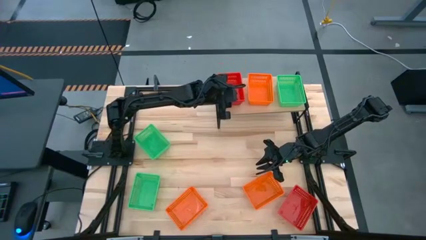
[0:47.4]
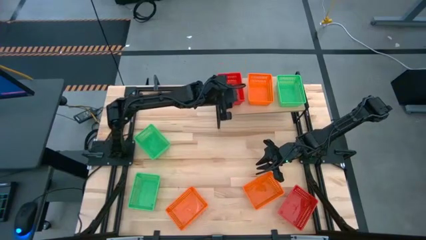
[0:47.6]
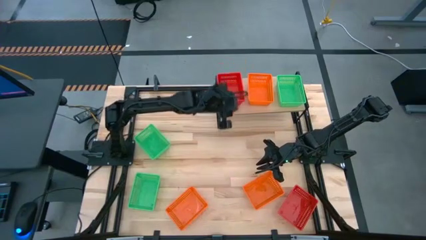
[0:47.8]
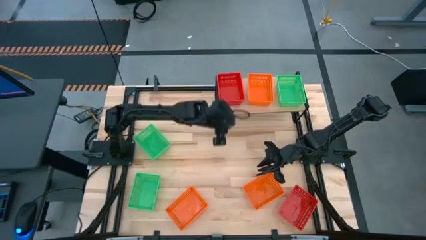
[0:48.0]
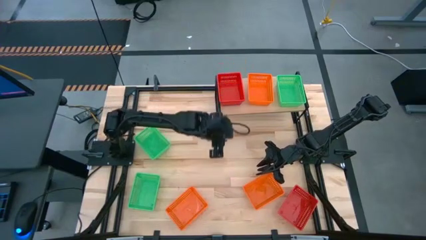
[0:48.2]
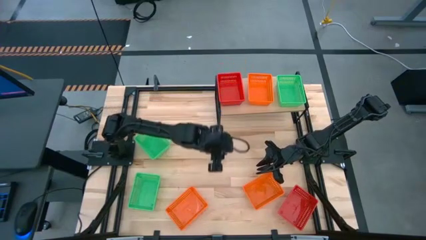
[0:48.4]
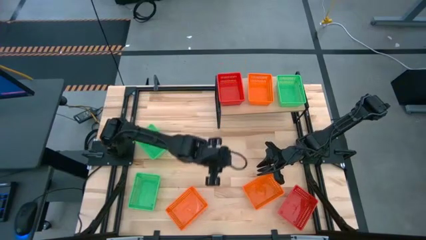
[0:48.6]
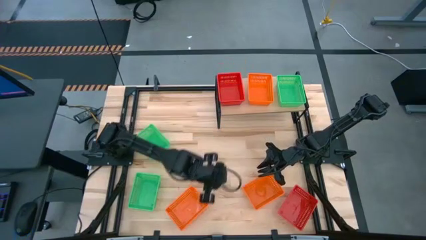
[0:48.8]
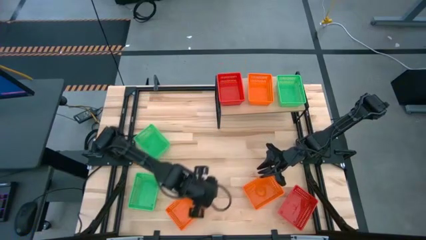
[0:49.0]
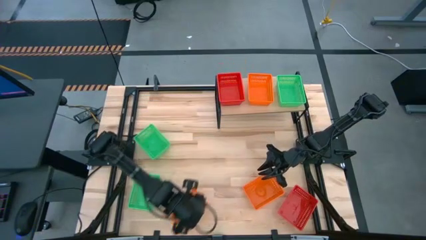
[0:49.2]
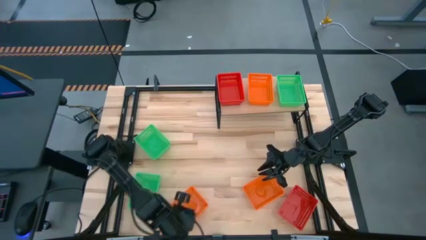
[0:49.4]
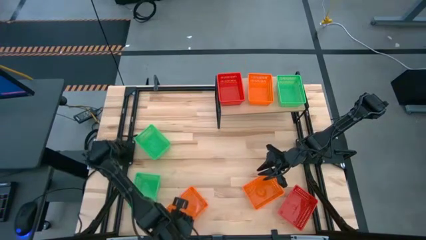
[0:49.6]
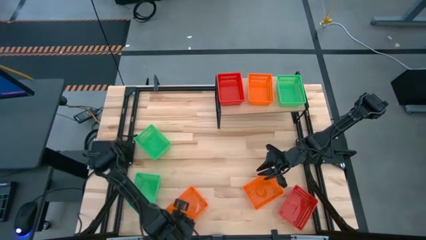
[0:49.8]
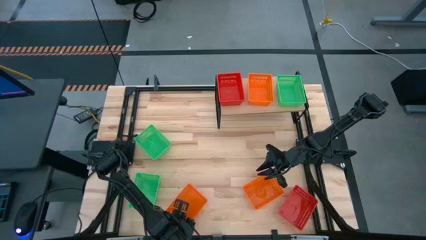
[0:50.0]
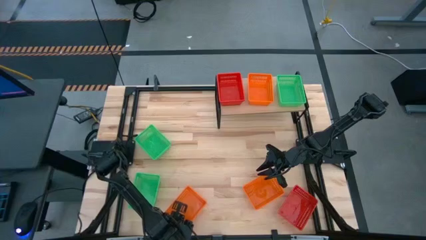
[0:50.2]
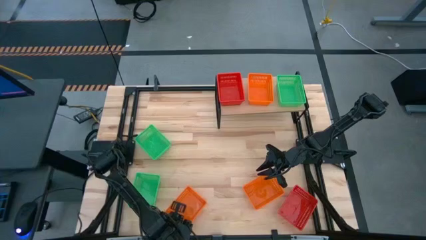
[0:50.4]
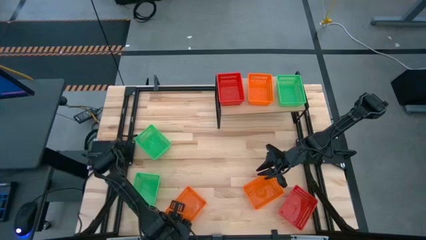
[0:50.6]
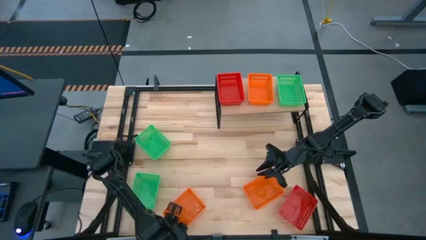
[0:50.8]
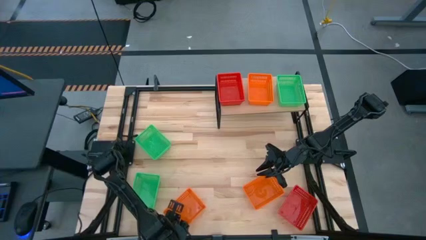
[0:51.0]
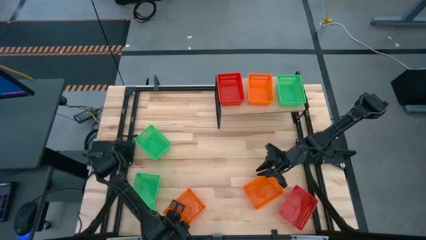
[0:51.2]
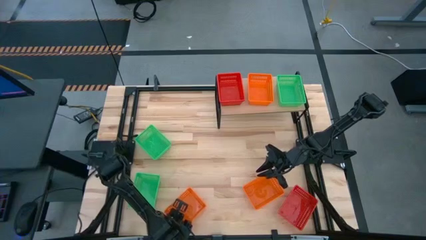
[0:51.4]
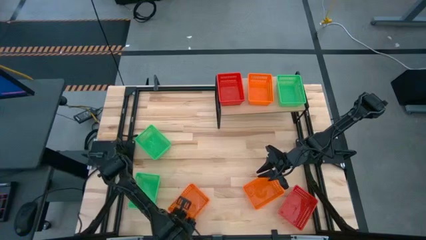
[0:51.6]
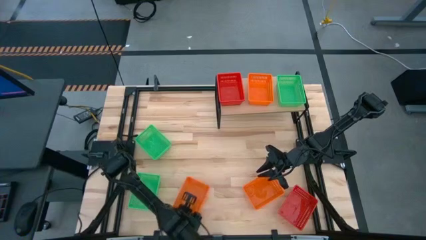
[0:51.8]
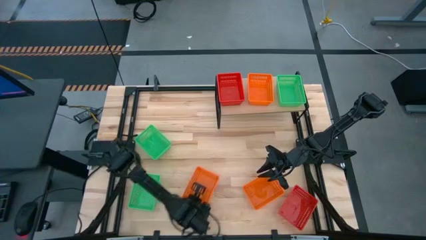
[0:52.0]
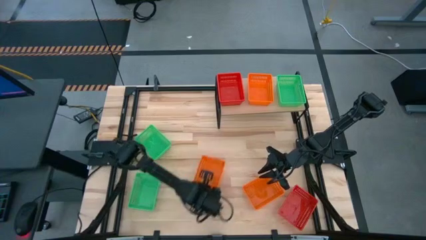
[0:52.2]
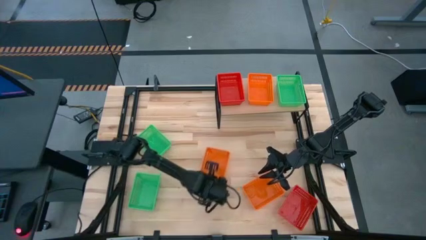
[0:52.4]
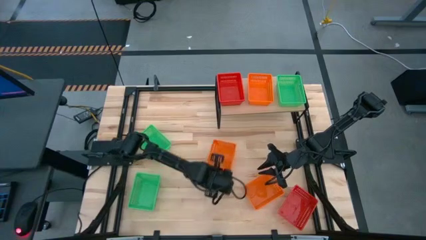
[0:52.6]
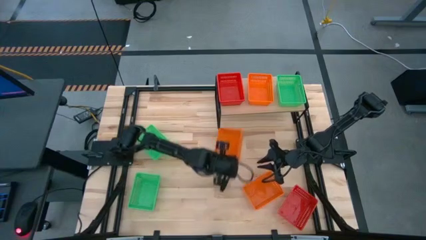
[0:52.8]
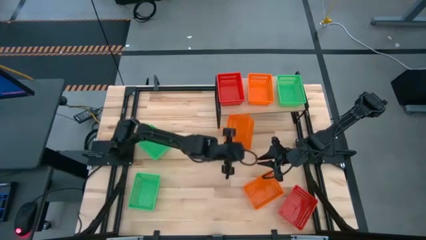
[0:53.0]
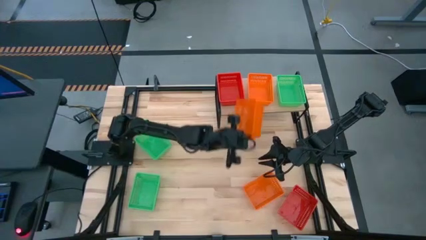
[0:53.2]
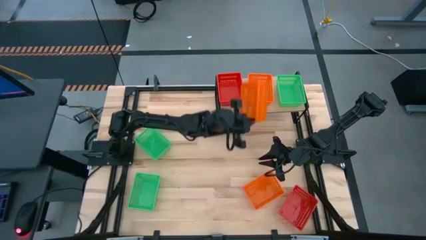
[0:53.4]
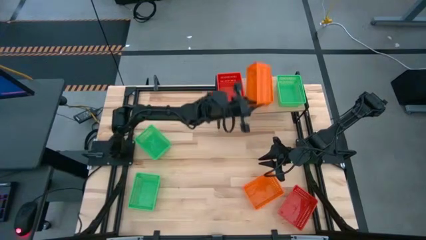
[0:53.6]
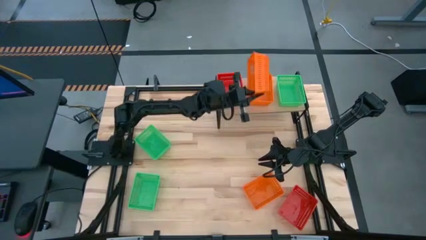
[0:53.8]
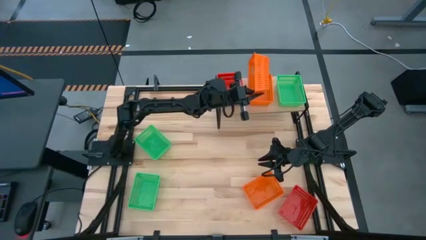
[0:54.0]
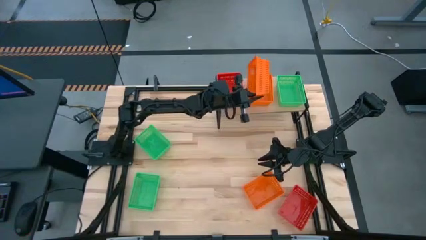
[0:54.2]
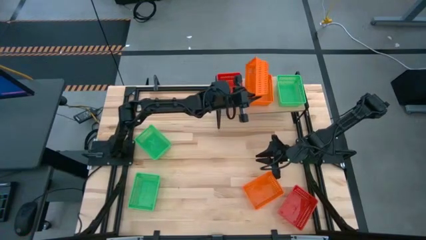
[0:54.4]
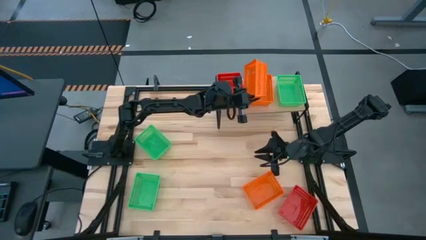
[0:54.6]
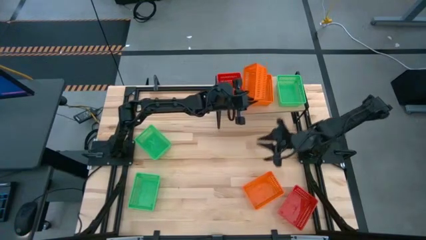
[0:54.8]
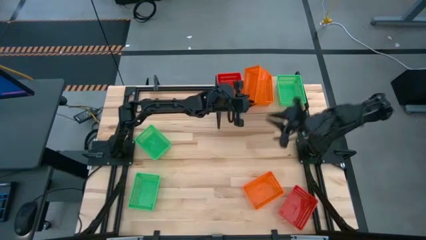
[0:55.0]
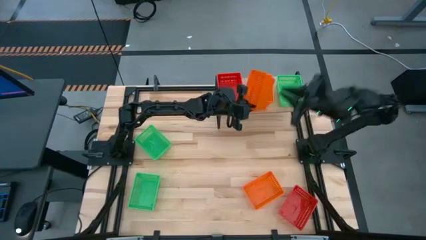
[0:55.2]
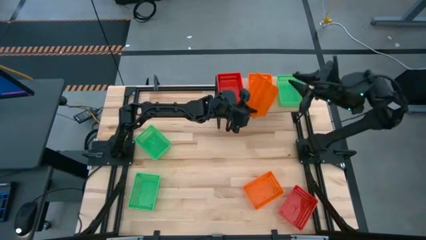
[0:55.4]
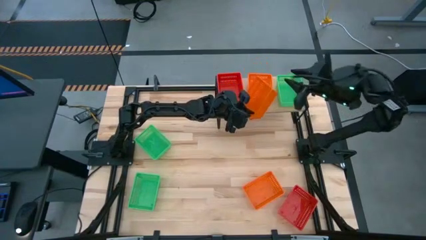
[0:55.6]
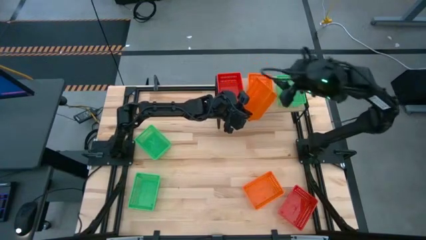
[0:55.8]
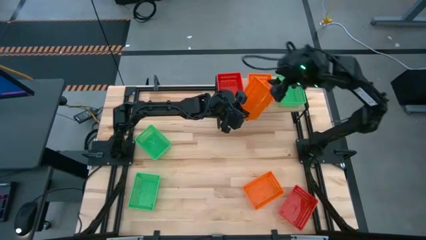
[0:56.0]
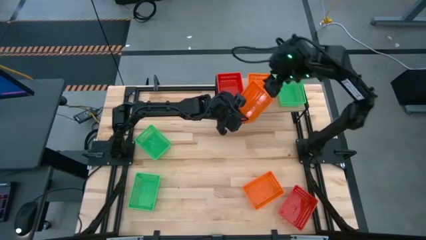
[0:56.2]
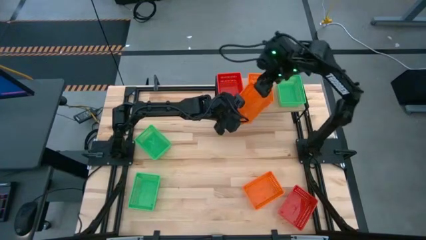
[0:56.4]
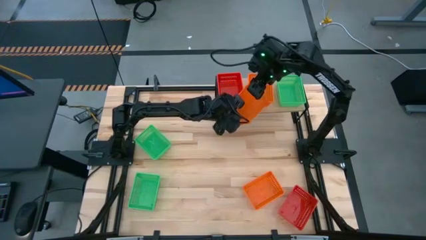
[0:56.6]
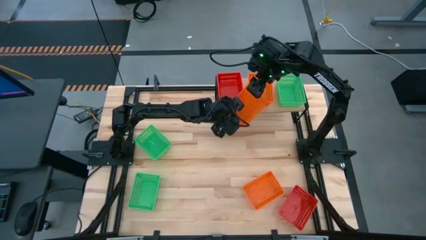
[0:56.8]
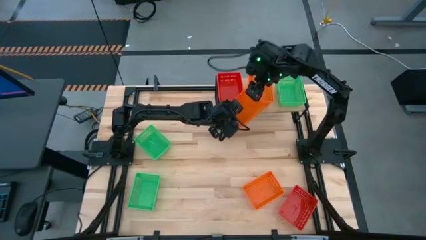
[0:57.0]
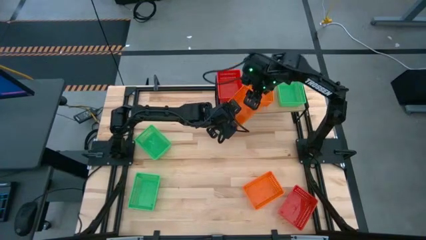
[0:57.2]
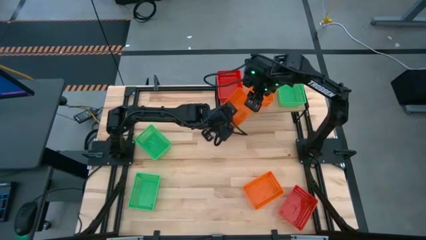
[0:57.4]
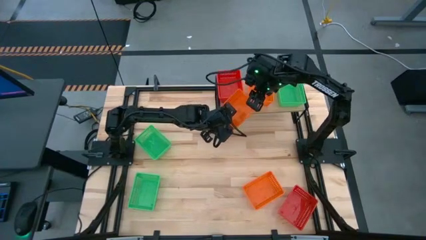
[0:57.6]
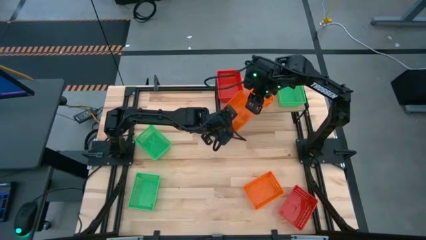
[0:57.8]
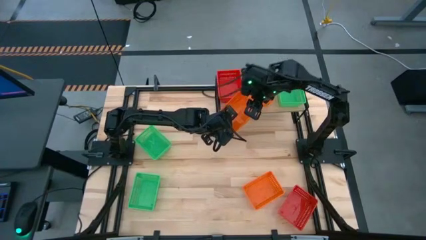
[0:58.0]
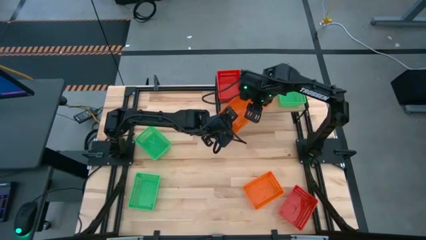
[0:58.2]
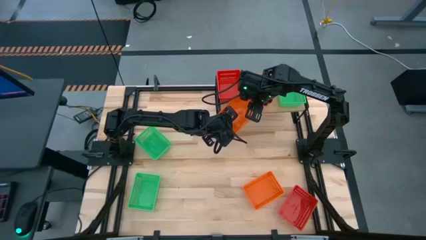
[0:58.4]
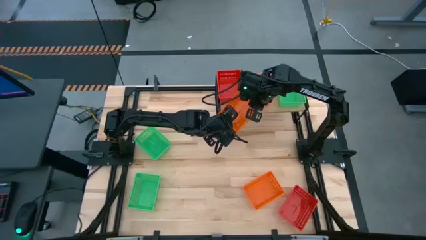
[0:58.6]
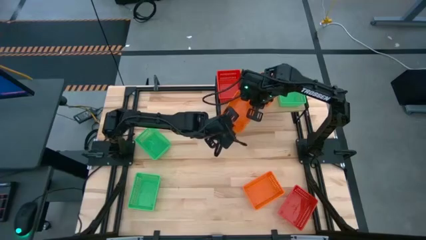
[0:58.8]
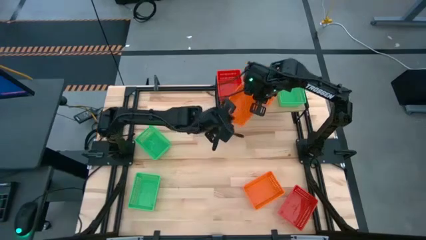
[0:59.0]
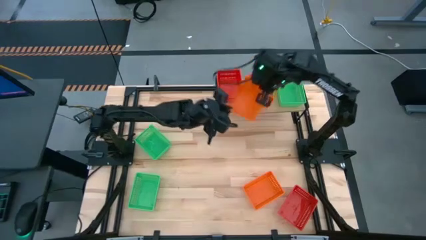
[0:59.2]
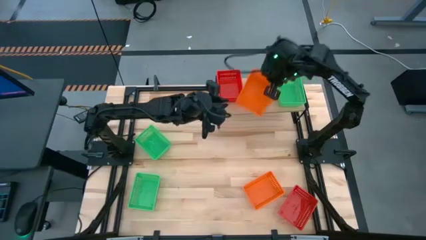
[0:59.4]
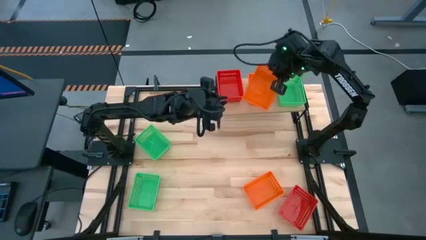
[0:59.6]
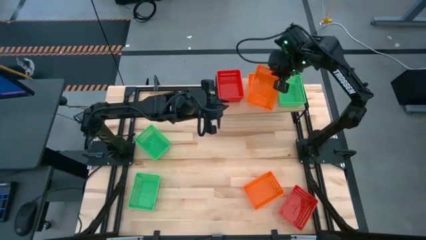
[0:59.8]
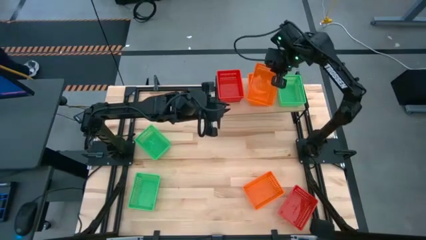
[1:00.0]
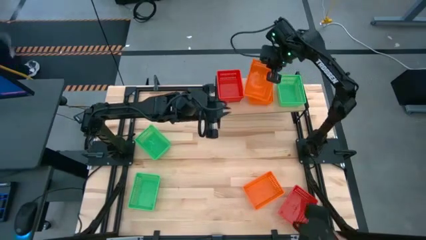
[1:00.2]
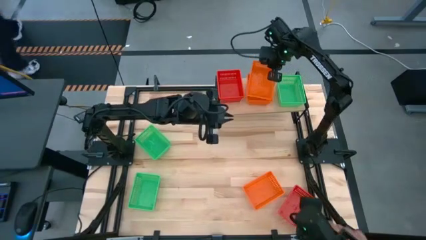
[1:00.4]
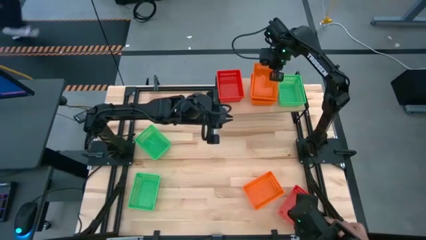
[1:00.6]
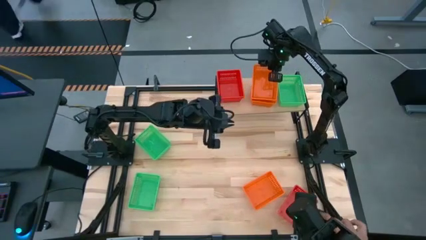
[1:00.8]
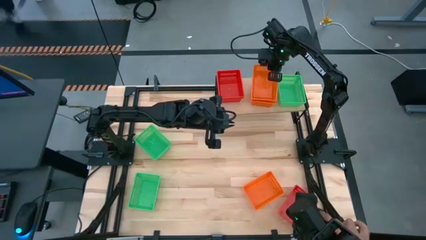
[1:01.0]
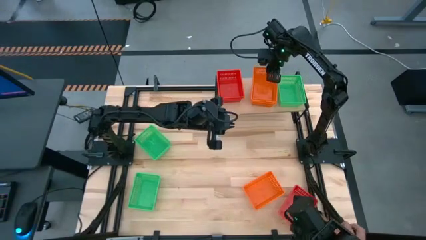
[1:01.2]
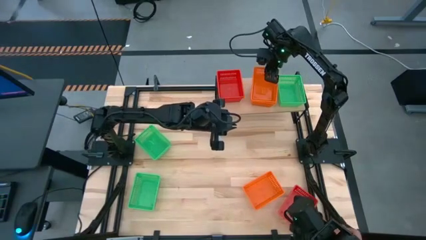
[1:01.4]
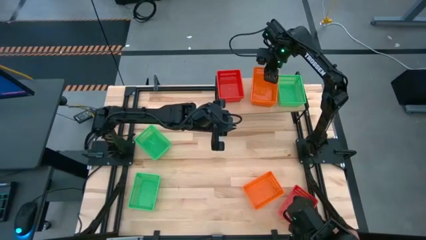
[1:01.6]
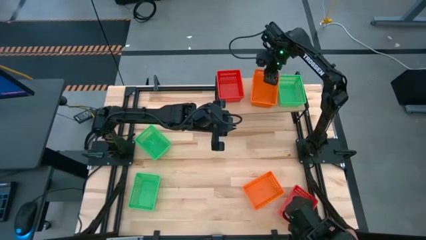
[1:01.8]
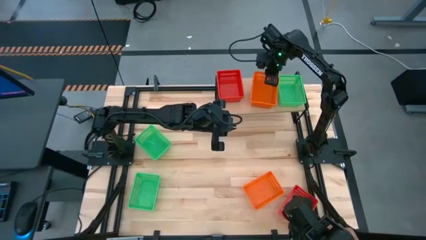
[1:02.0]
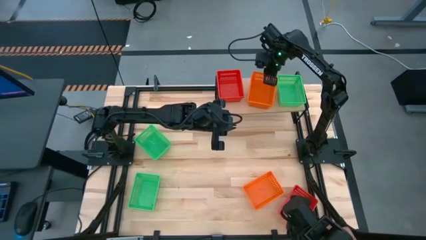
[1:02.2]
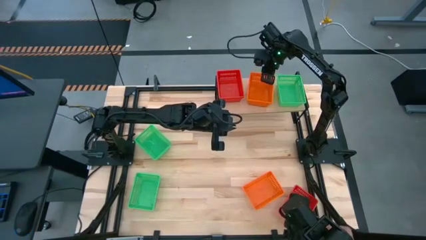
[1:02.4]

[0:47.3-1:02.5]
Task: Stack baskets on shelf by color
Stack the left orange bin on top of the orange bin on the shelf

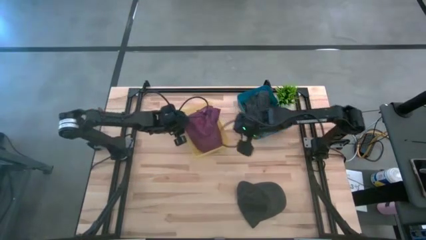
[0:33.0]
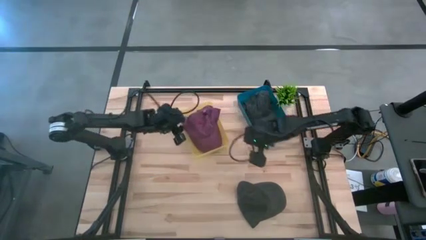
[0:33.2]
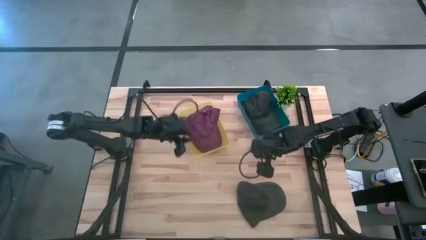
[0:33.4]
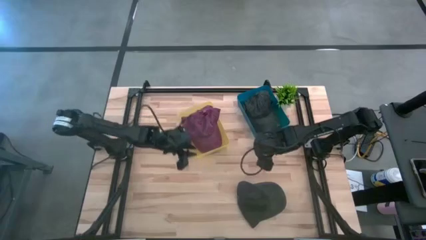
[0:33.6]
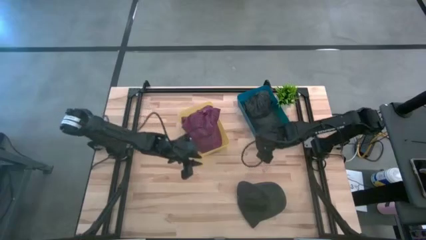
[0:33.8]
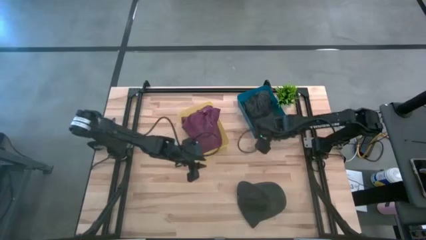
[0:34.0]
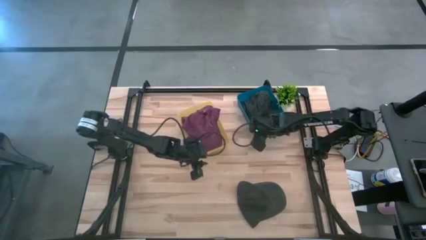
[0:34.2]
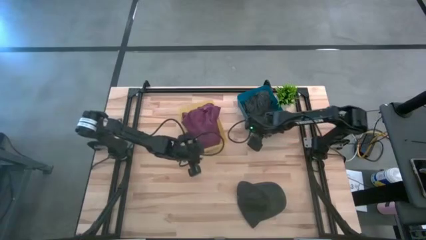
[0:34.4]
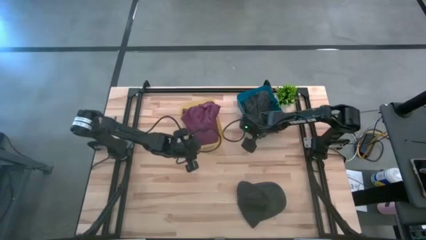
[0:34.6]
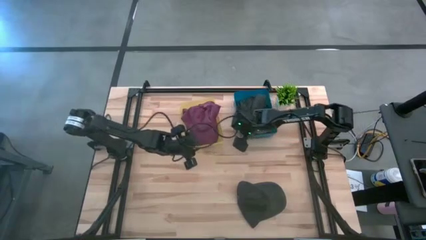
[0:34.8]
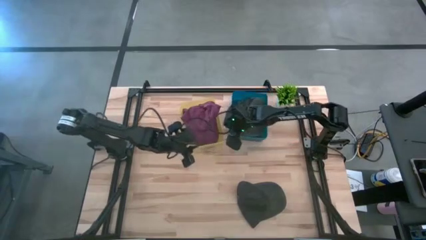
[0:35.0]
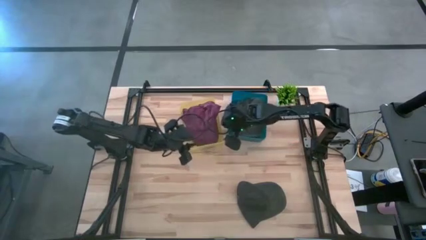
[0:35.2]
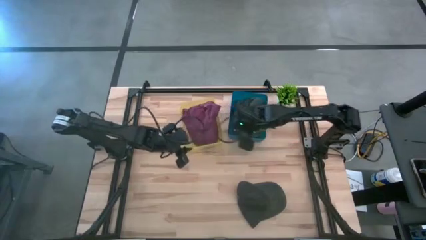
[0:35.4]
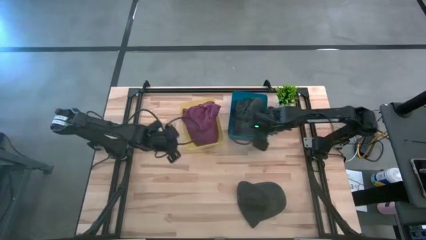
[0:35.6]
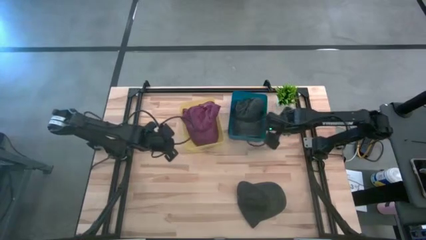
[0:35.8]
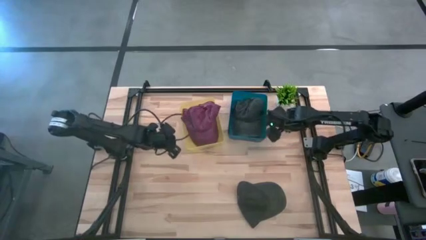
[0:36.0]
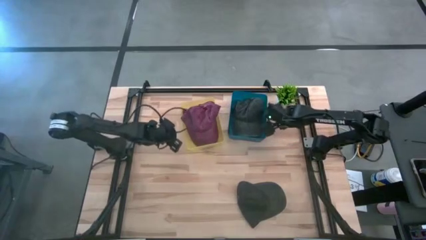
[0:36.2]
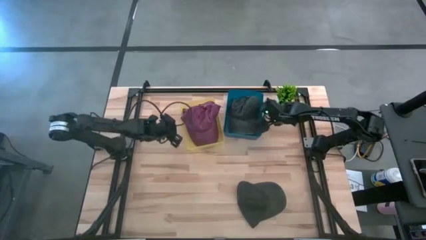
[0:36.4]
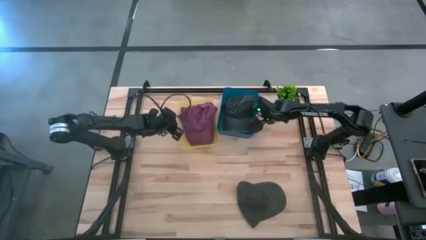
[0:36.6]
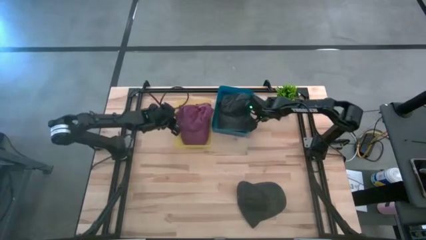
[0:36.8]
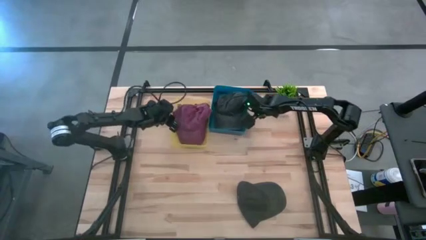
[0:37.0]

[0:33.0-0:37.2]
Task: Pick & Place hat
Adjust the bins
